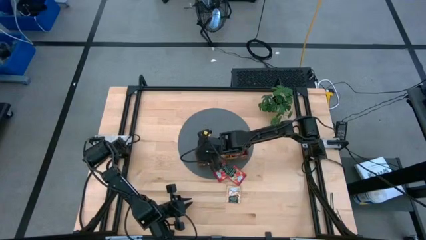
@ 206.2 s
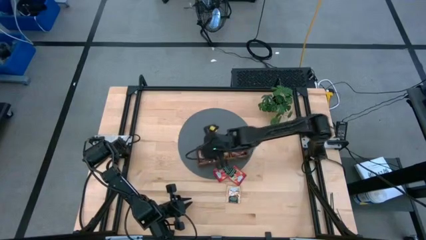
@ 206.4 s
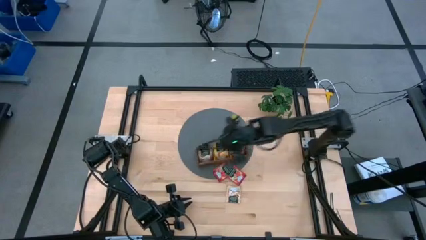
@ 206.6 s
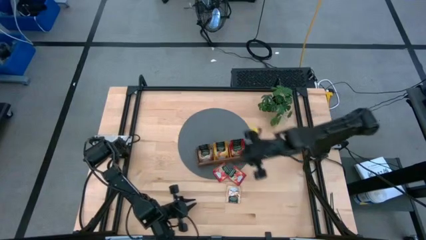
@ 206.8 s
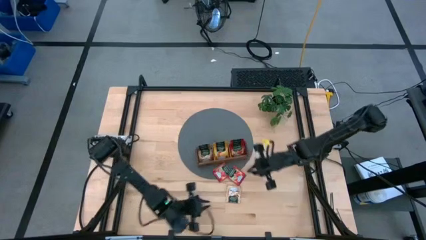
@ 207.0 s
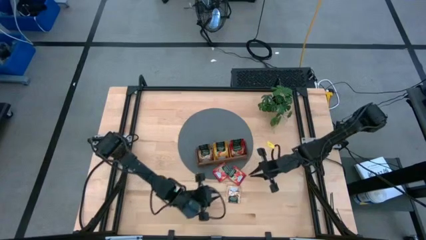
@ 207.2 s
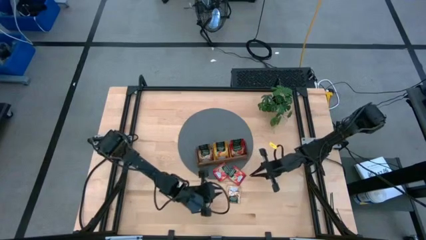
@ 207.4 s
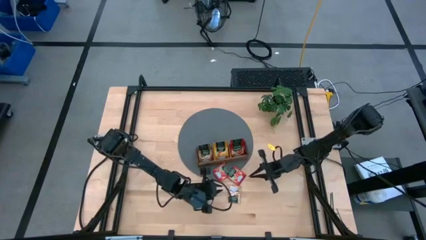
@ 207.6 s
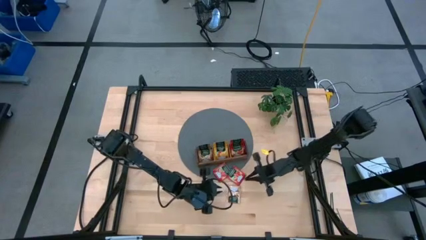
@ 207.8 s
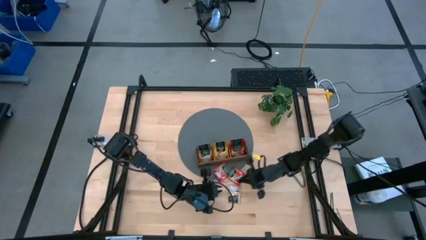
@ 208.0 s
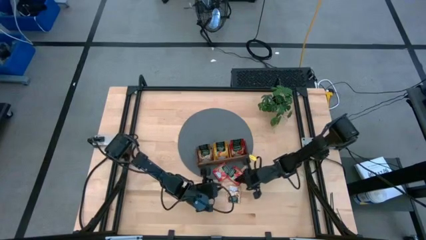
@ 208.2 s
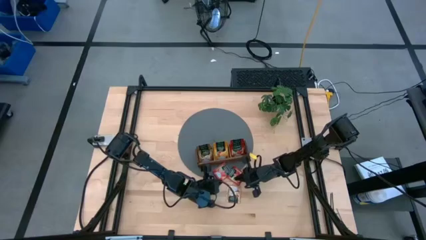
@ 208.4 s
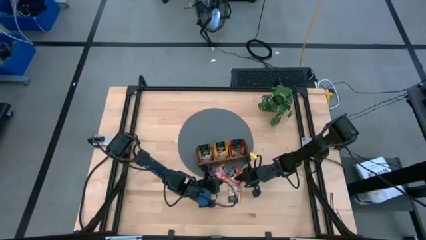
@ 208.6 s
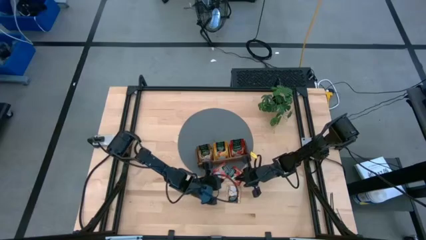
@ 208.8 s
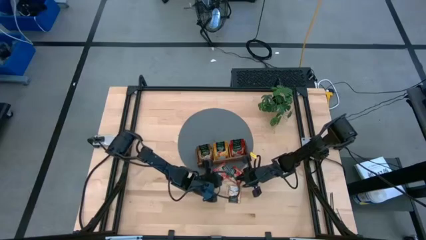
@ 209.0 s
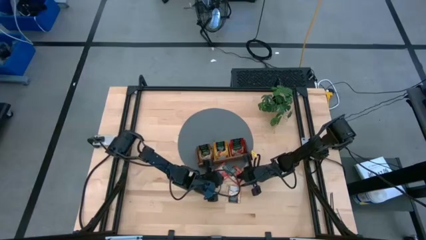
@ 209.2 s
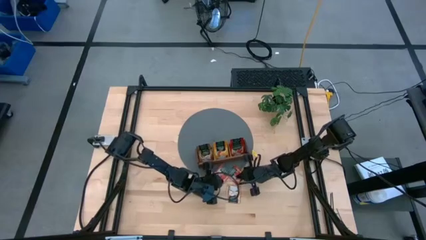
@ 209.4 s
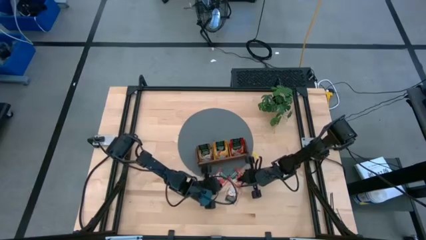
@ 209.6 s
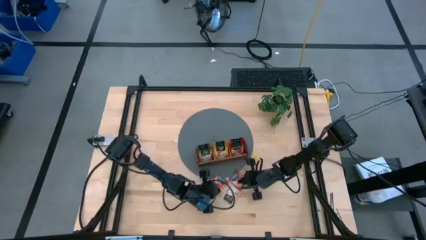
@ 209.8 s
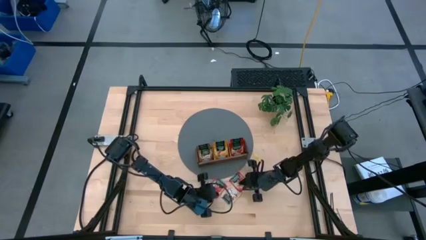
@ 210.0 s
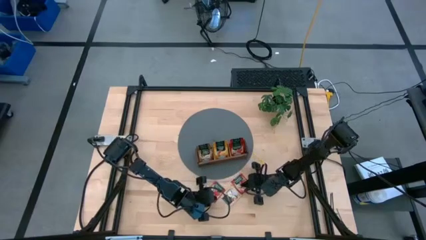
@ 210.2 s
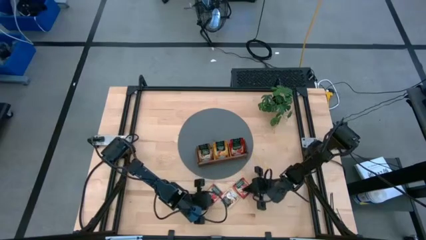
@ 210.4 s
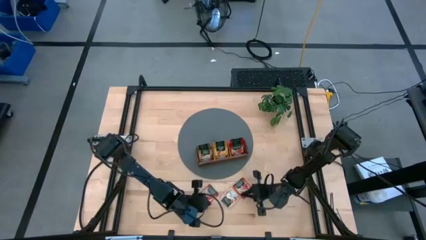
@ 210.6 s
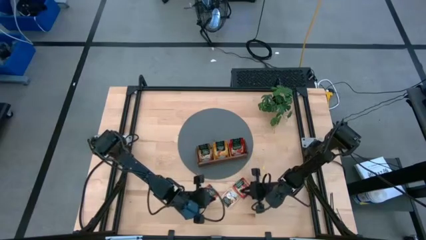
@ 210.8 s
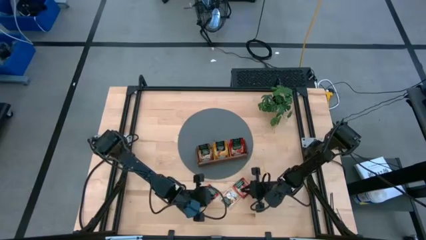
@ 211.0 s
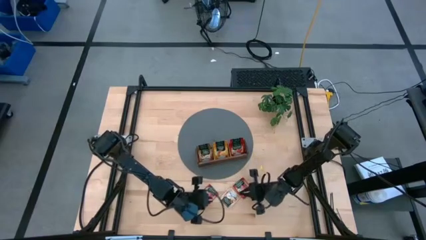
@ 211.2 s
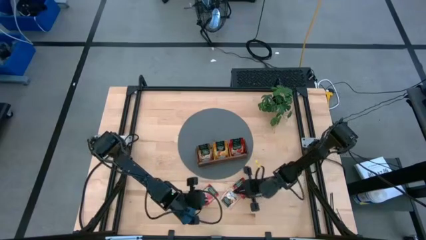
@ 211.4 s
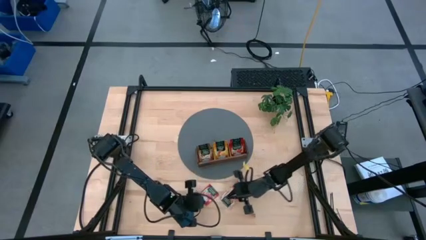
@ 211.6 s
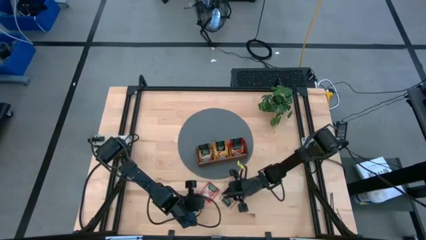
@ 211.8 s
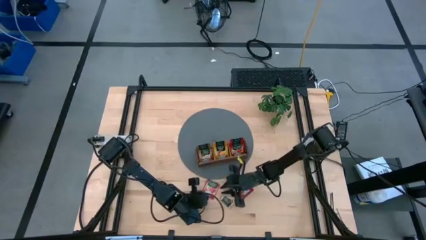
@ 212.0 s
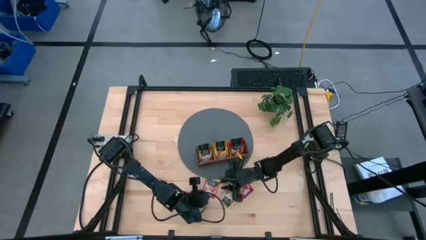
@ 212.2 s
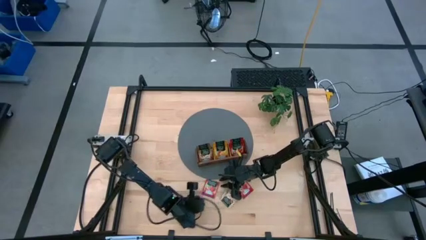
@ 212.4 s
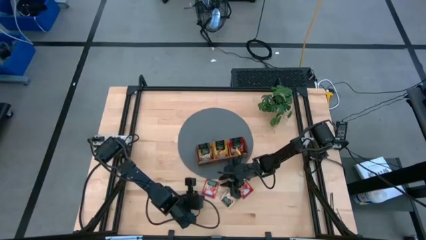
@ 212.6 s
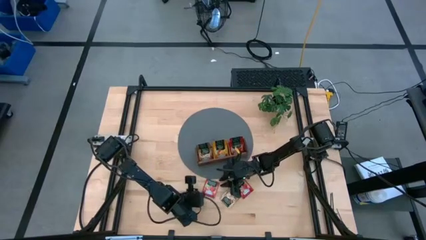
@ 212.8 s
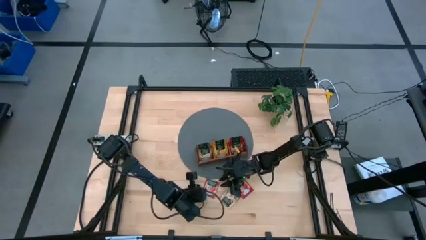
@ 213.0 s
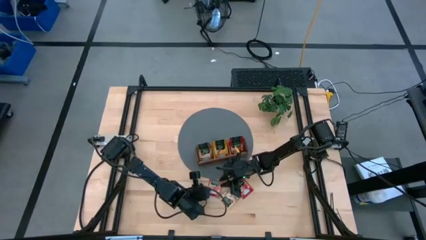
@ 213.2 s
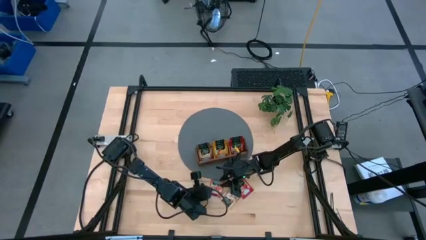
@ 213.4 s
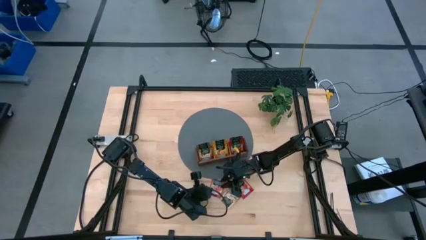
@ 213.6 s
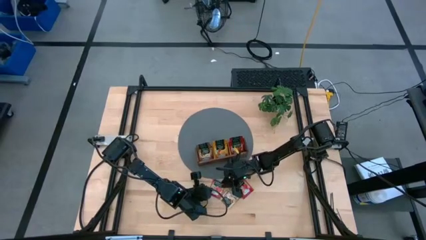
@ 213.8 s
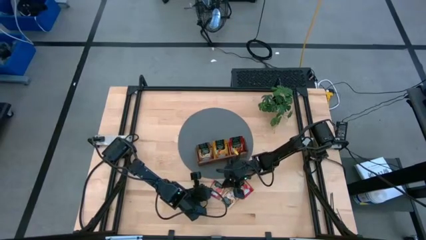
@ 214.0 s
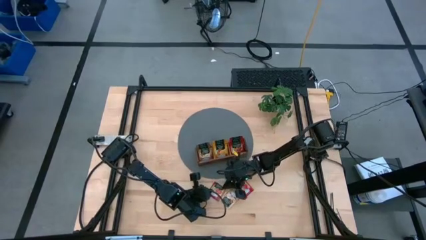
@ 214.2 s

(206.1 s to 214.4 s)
Task: Pick & Place Tea
Put the red tea bag into the right section of the wooden organizer

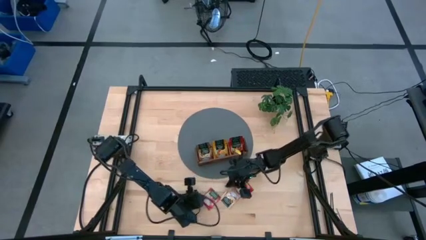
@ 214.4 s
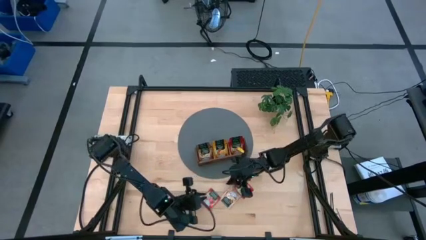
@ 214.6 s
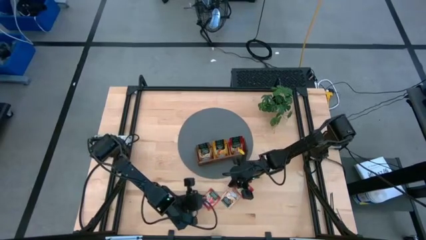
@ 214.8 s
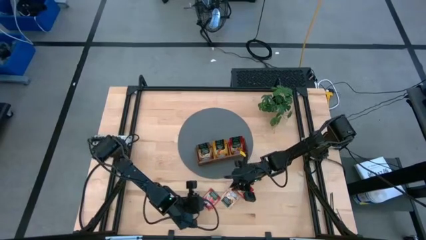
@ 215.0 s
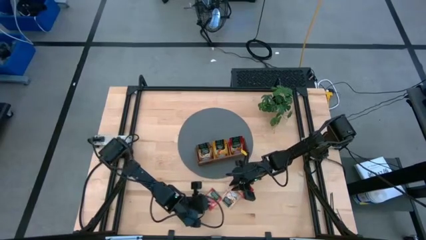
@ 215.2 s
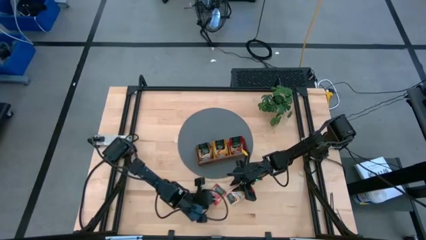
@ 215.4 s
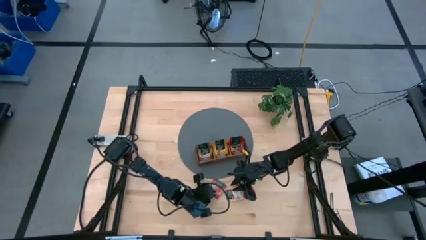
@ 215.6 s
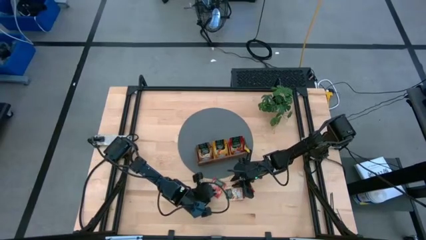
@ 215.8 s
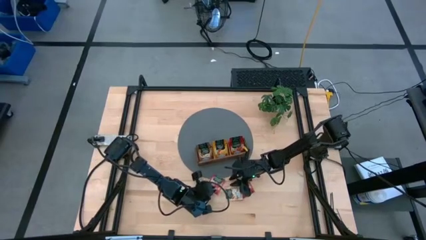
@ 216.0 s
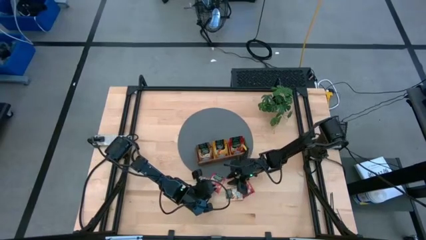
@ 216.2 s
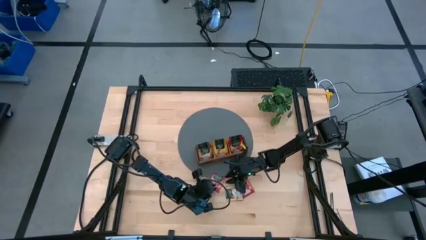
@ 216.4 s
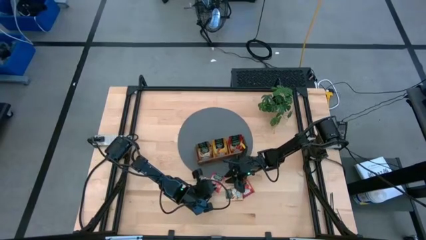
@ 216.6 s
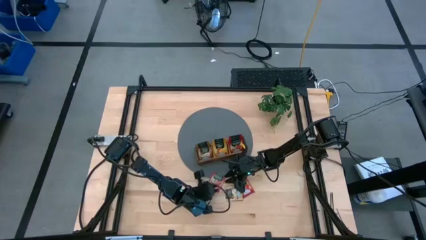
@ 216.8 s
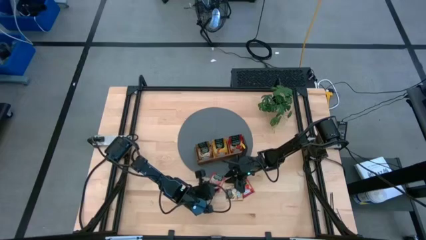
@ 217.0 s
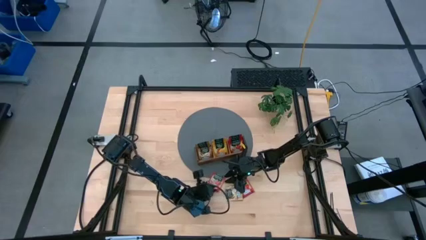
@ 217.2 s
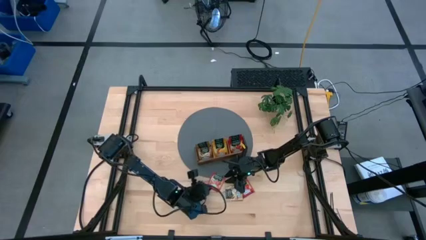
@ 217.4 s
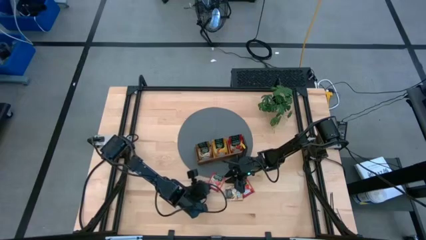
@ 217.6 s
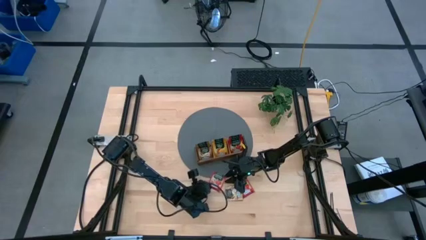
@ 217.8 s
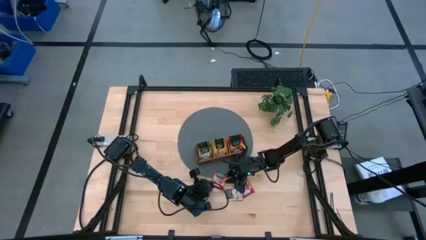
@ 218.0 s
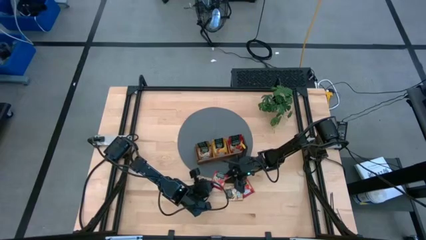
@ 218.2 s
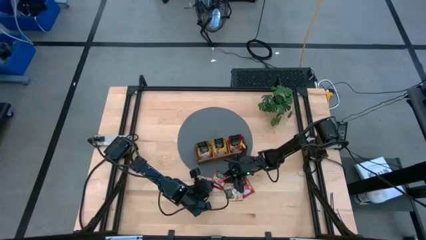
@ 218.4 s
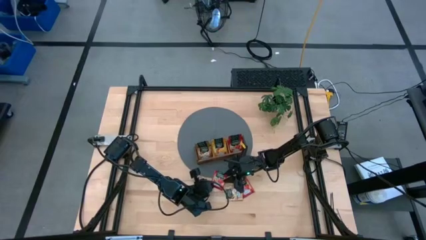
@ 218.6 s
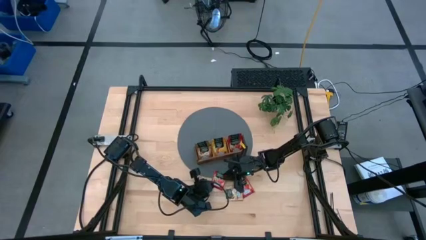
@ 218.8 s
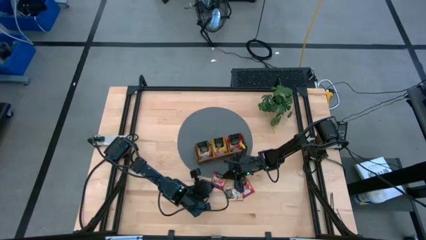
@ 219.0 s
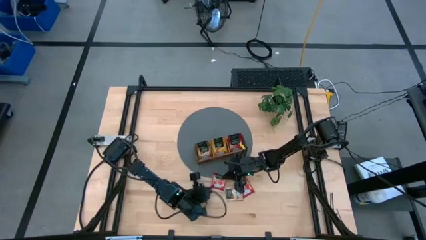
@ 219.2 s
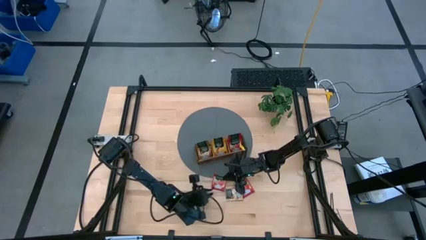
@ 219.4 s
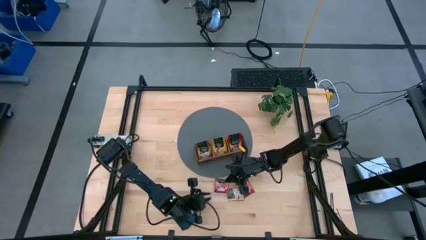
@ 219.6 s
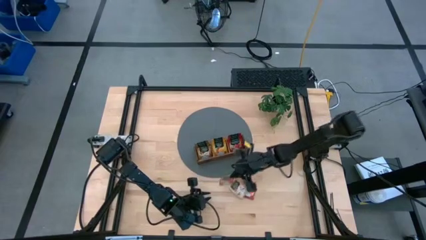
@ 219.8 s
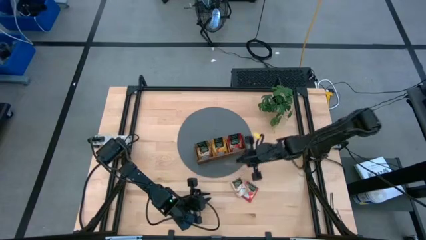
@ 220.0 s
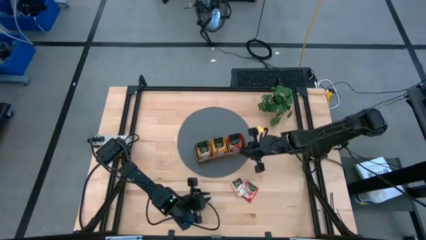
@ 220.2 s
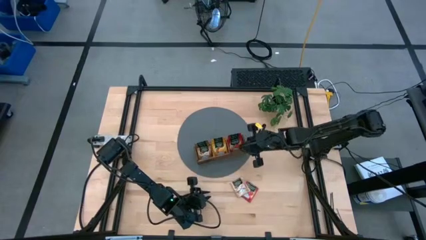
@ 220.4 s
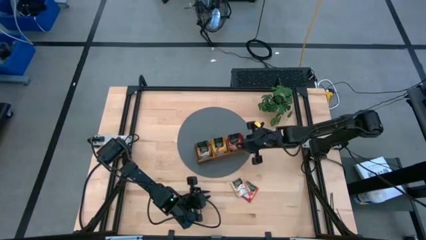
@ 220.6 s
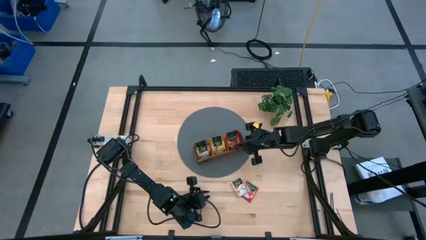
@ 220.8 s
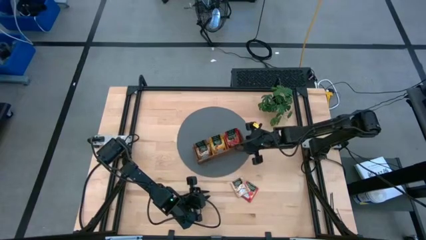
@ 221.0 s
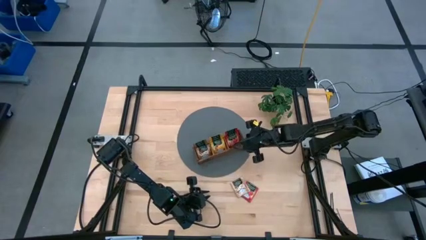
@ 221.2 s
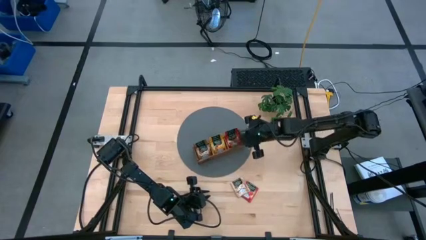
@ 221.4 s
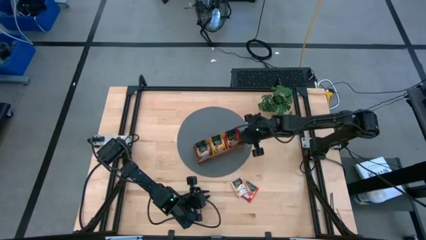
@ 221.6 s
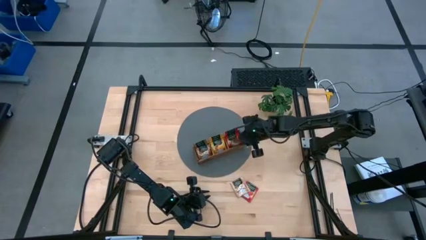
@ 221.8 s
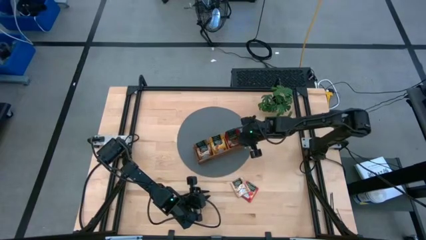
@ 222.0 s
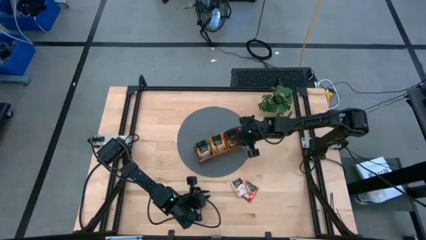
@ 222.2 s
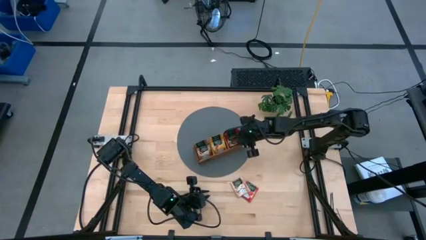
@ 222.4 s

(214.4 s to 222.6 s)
Put the red tea bag into the right section of the wooden organizer
